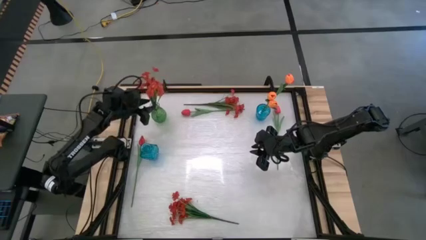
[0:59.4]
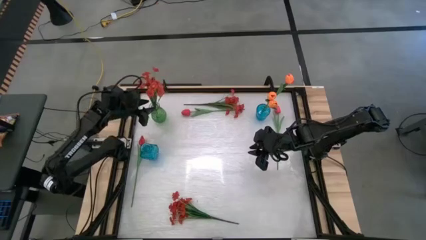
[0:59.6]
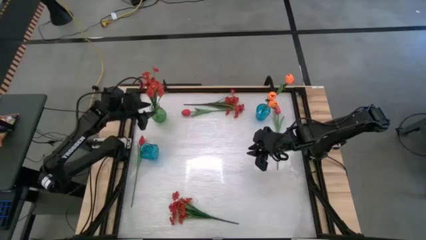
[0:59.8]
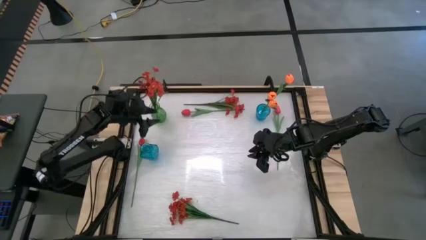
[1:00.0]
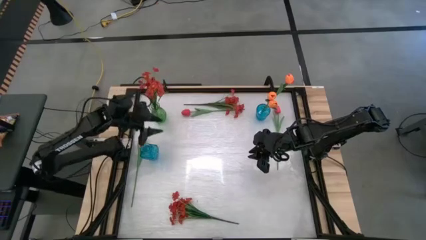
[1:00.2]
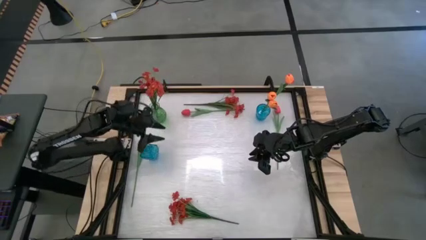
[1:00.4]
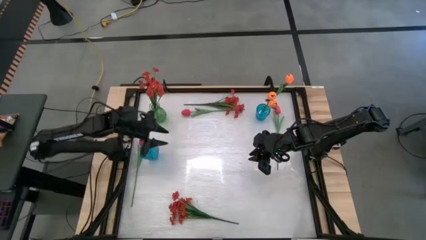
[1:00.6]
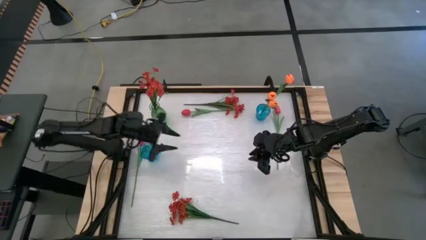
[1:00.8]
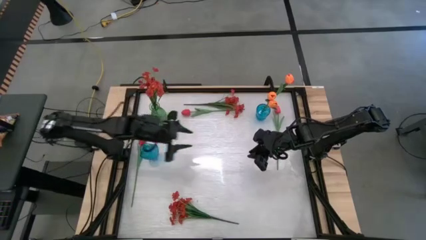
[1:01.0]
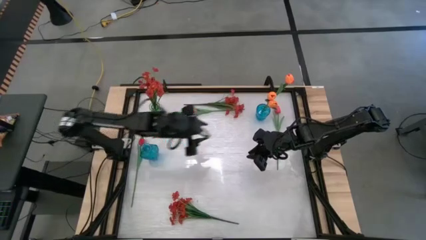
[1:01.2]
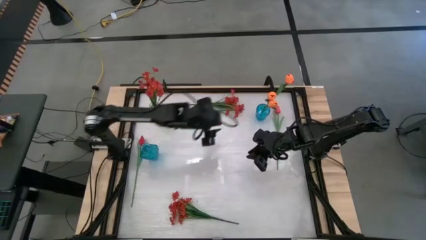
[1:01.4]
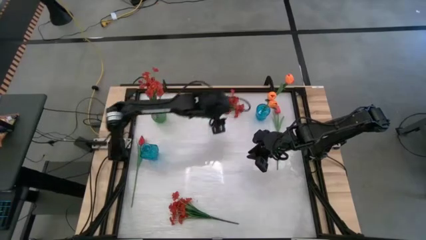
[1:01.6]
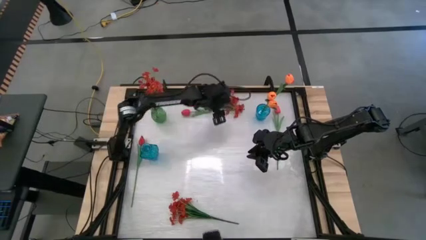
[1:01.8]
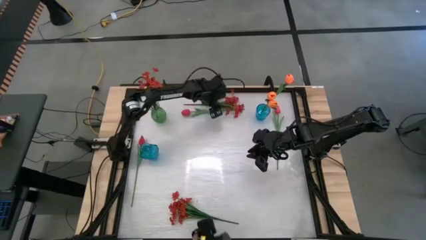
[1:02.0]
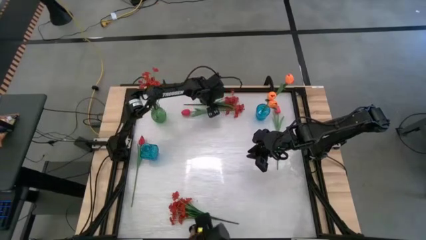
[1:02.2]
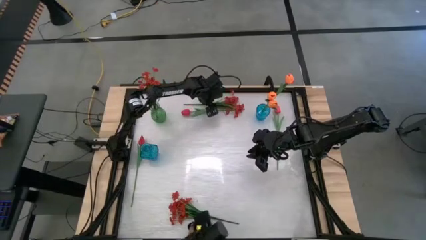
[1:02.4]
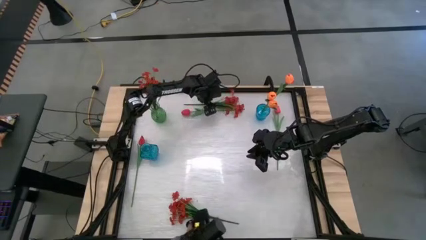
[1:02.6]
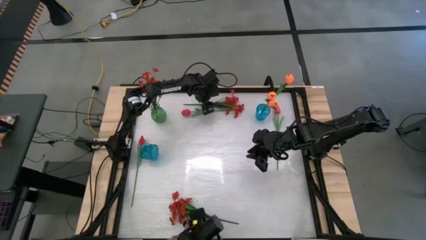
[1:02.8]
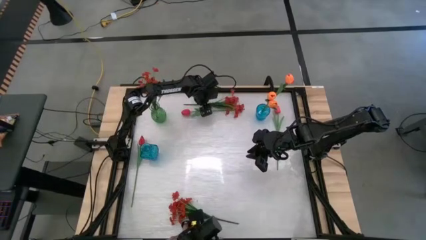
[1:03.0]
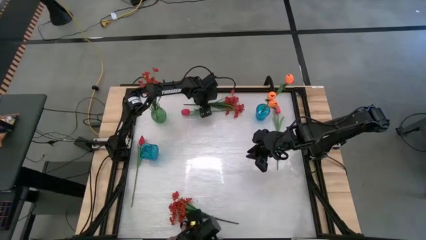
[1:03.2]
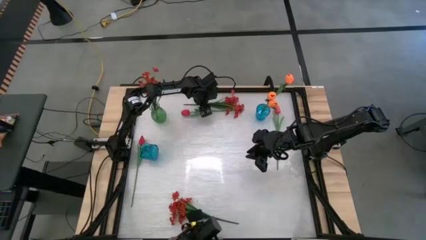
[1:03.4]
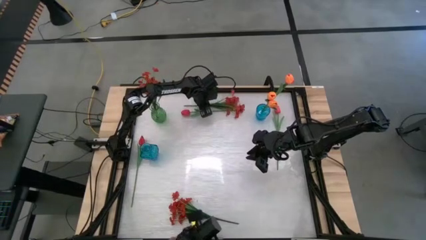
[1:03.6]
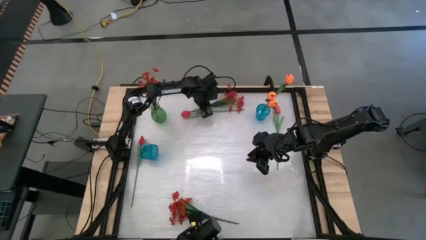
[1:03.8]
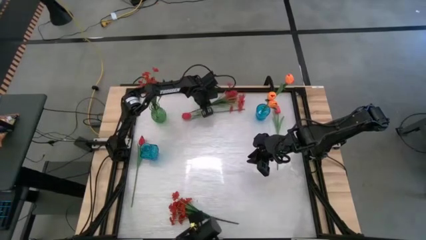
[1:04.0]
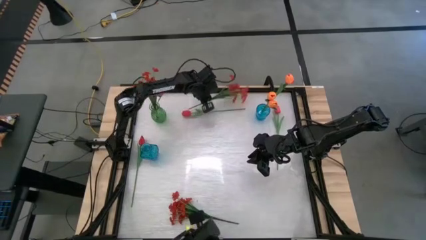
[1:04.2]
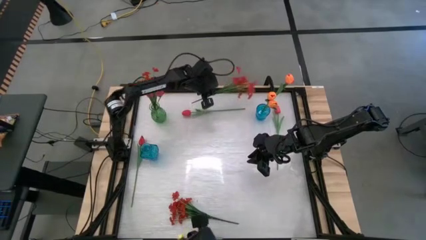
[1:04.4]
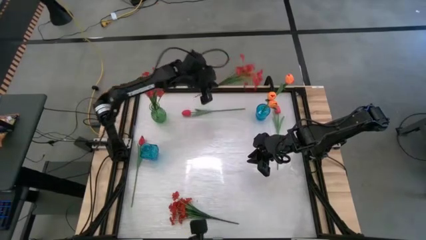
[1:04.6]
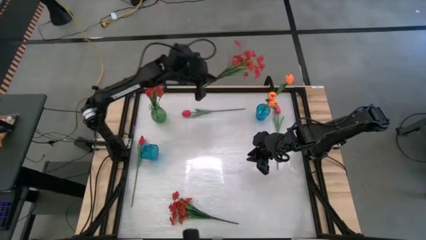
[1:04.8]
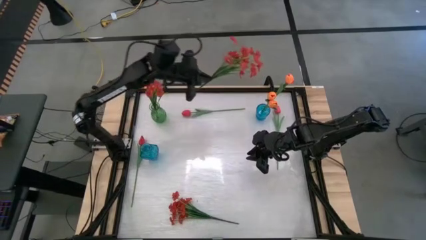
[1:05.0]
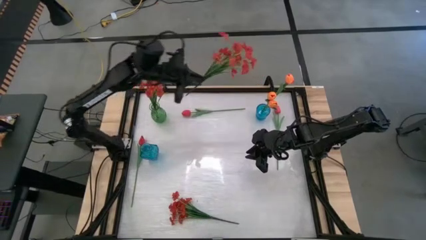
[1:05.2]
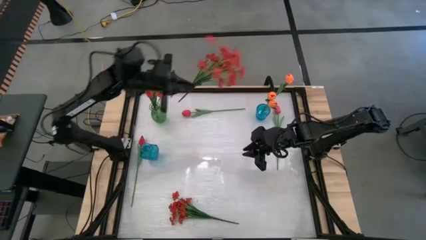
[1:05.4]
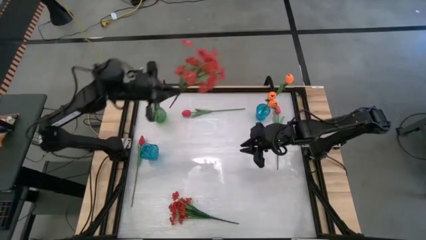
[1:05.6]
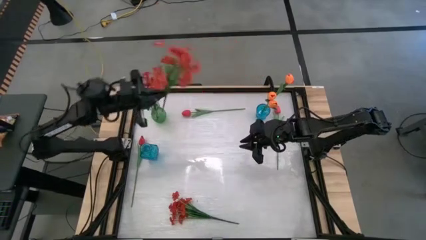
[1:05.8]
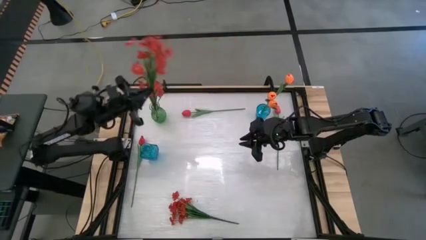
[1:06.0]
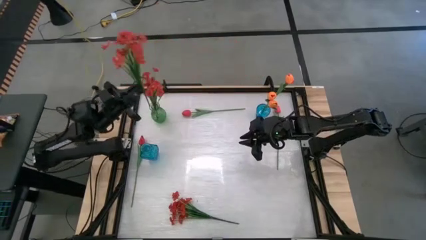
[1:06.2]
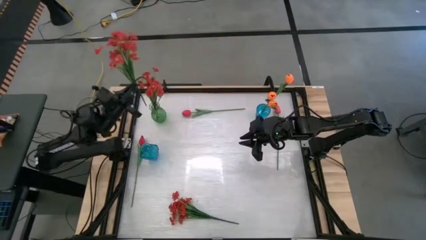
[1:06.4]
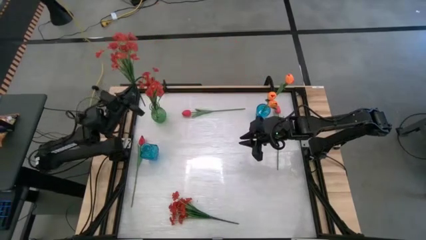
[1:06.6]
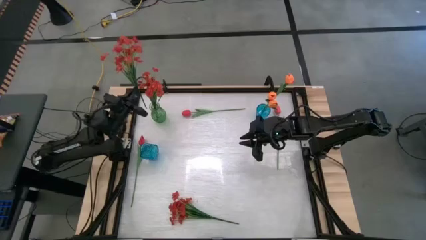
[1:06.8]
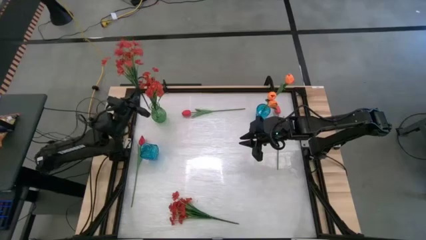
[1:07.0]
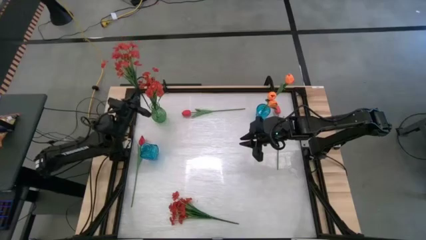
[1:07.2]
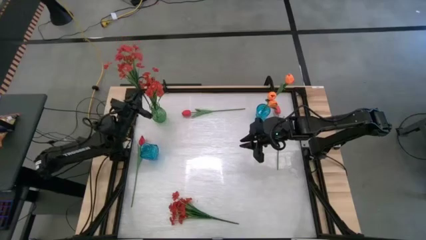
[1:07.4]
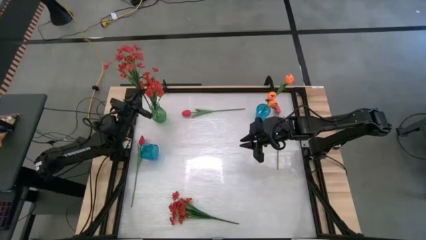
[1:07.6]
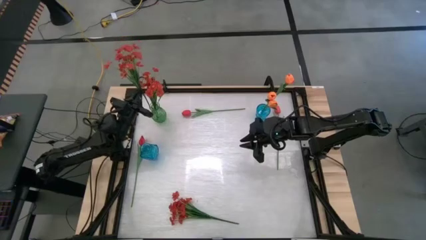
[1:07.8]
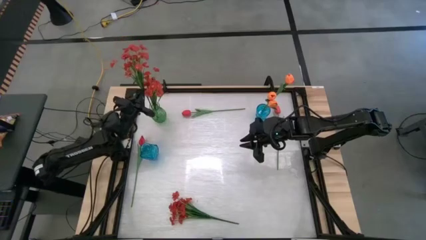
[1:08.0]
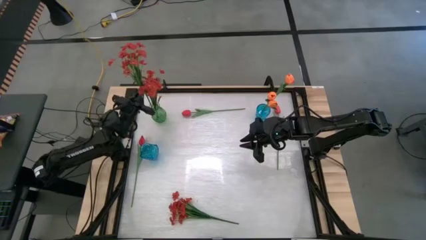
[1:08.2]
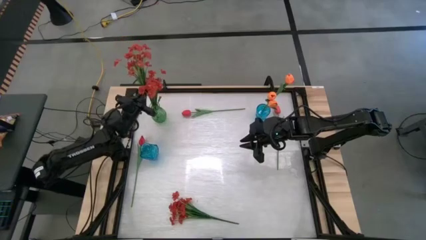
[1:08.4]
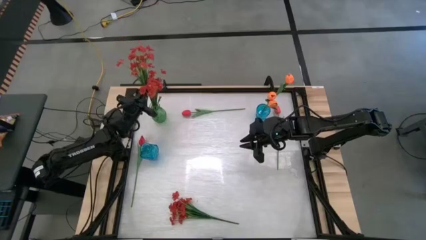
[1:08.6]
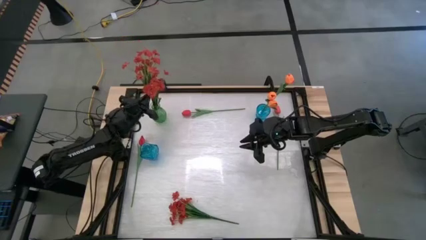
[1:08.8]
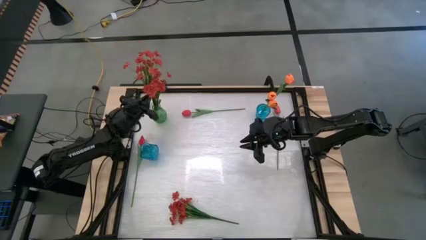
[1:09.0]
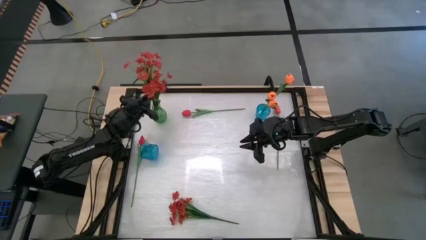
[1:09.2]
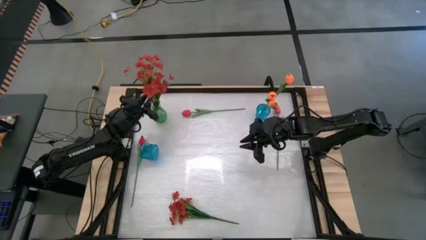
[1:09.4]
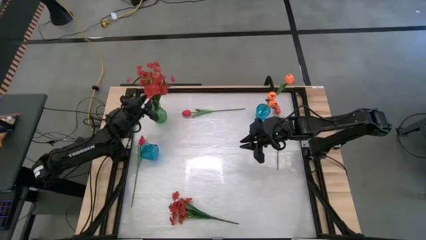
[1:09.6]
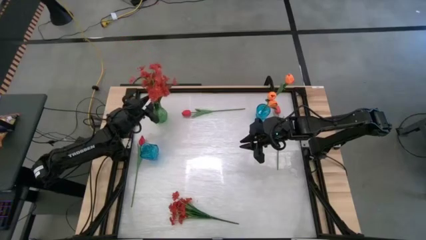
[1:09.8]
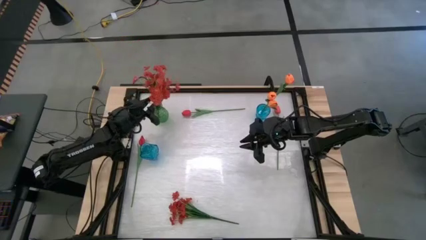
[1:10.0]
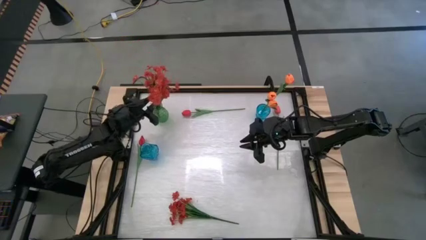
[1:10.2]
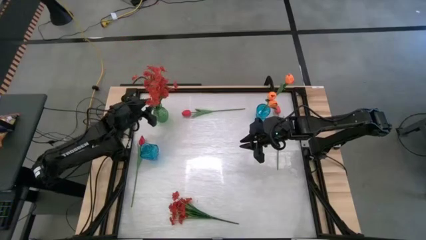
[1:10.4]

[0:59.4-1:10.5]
Task: Sort flowers into vase by color
Put the top red flowers into the green vase

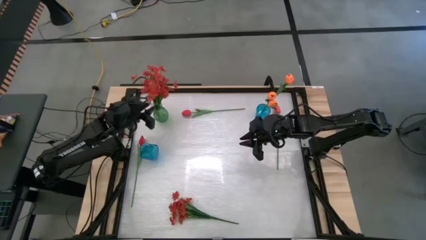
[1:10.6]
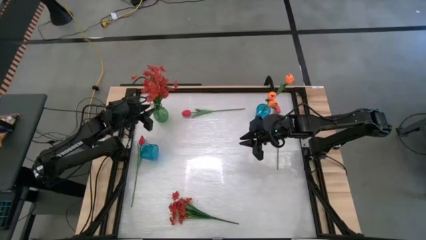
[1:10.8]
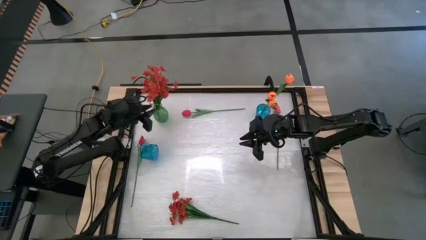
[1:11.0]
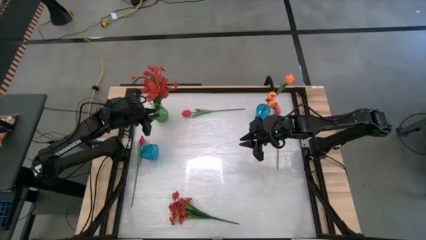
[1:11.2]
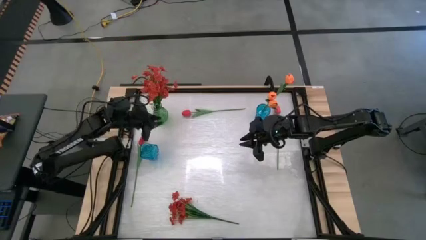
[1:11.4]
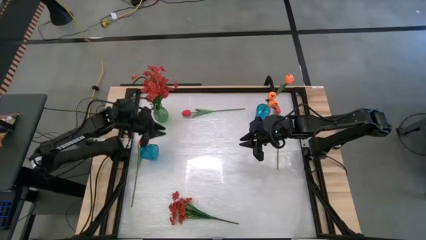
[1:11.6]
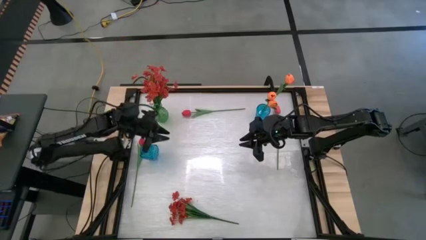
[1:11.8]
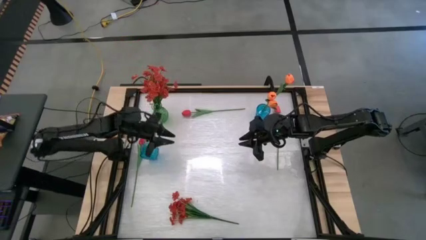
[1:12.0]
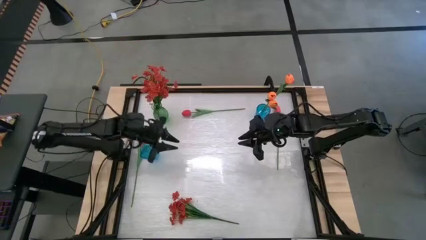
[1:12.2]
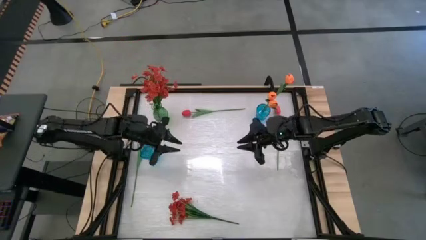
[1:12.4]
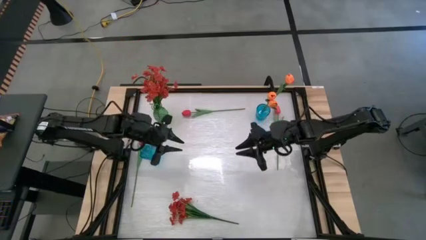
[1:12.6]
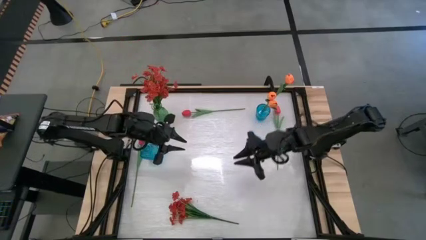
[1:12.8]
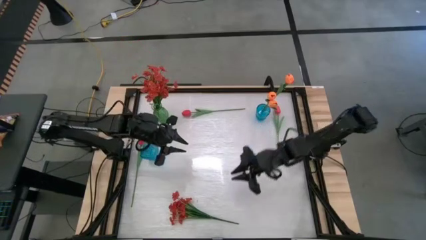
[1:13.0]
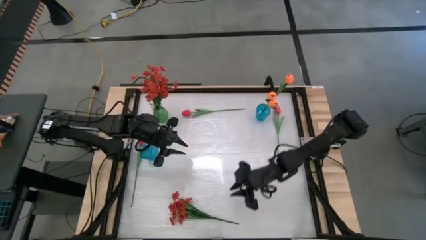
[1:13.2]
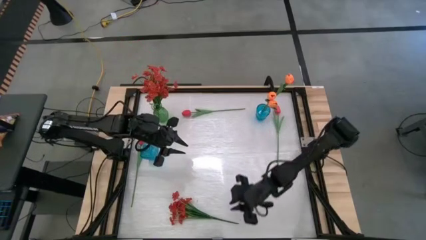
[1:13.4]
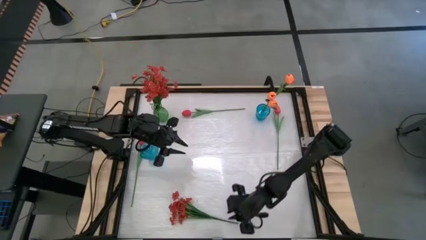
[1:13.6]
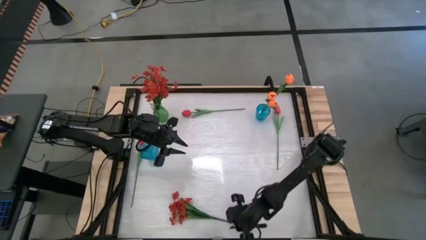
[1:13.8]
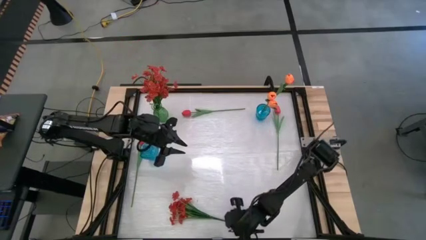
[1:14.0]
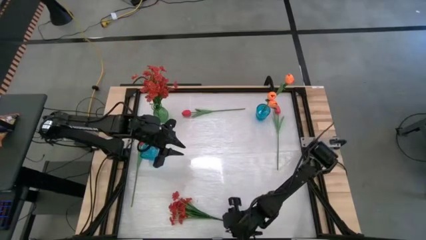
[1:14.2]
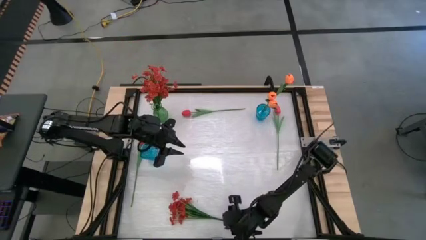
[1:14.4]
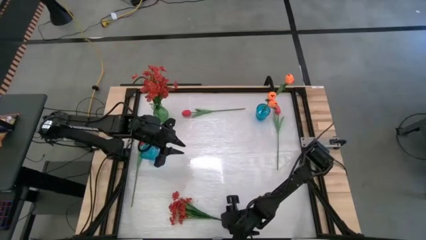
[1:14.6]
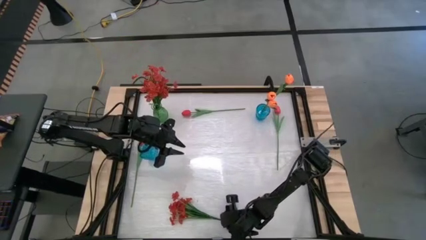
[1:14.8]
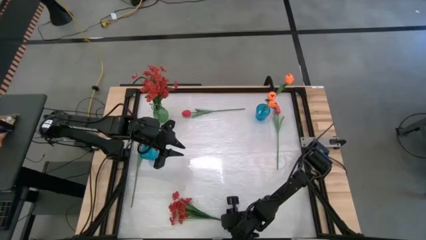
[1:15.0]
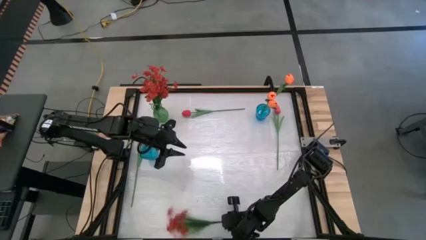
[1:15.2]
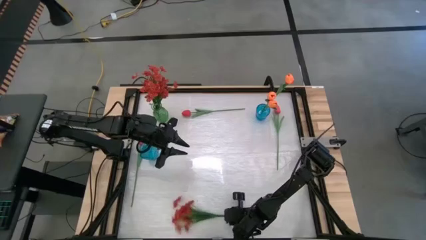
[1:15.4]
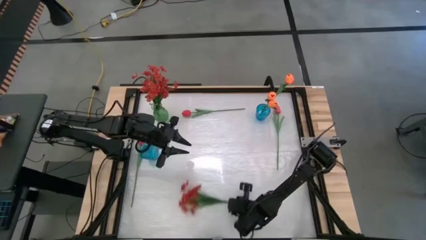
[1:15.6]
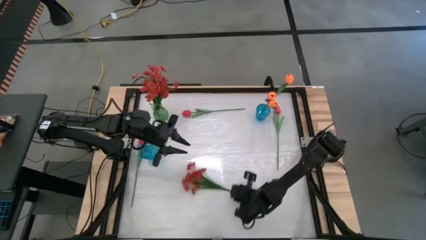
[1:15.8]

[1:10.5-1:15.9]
Put the red flowers into the green vase
